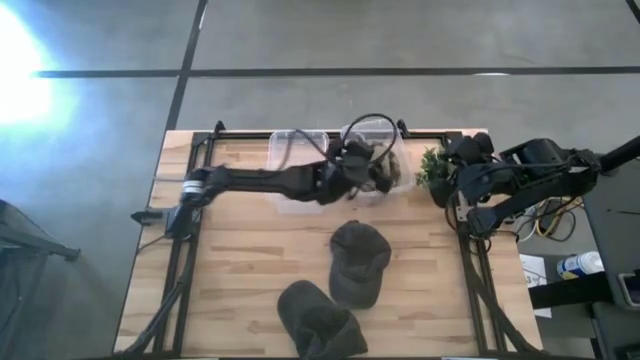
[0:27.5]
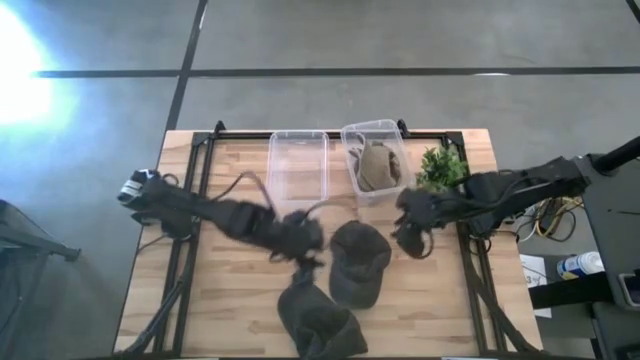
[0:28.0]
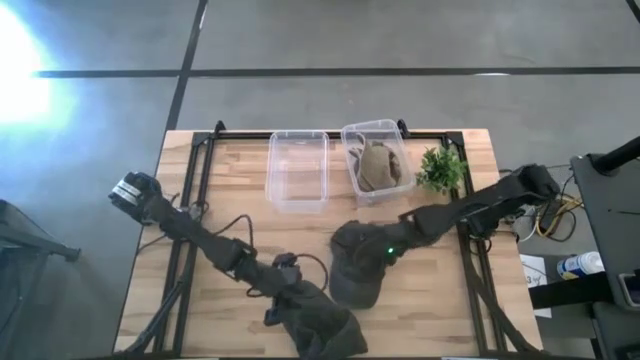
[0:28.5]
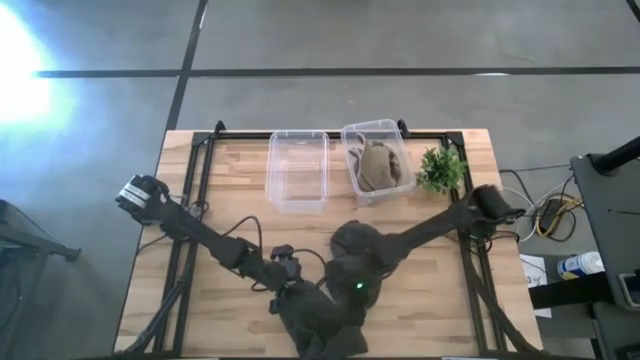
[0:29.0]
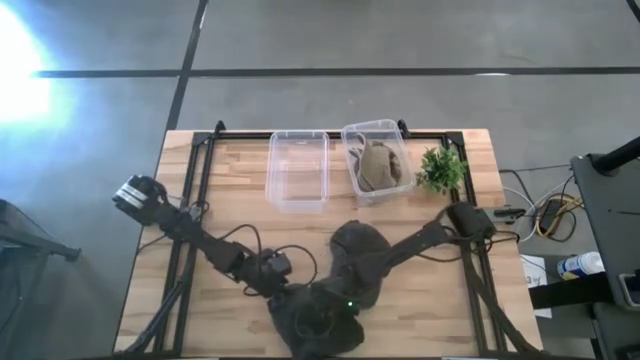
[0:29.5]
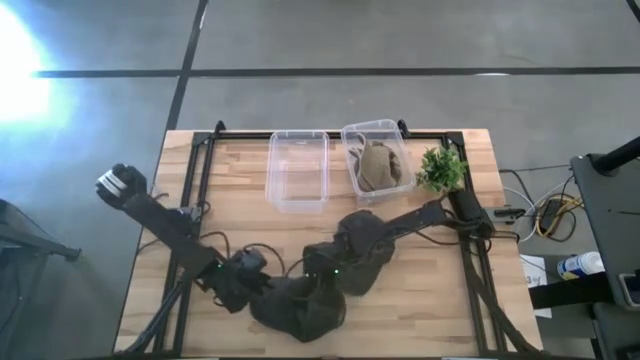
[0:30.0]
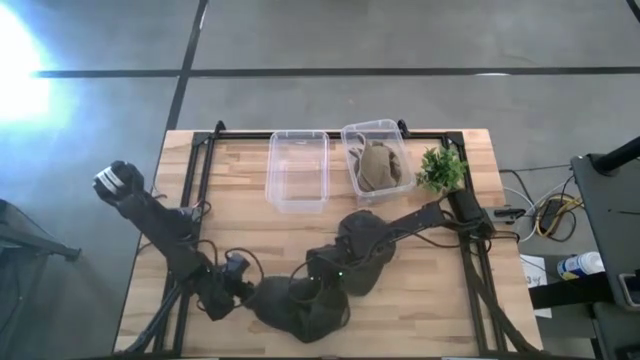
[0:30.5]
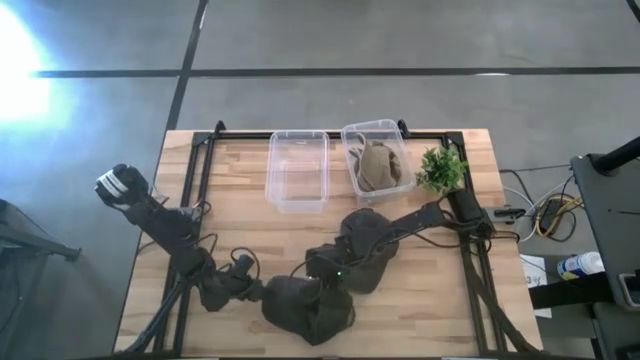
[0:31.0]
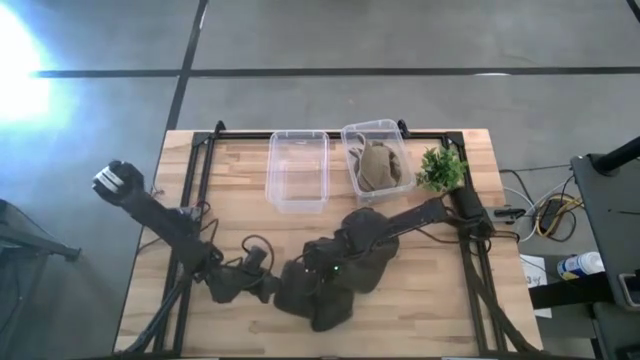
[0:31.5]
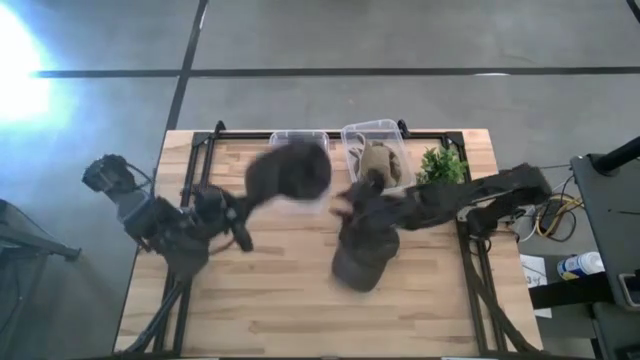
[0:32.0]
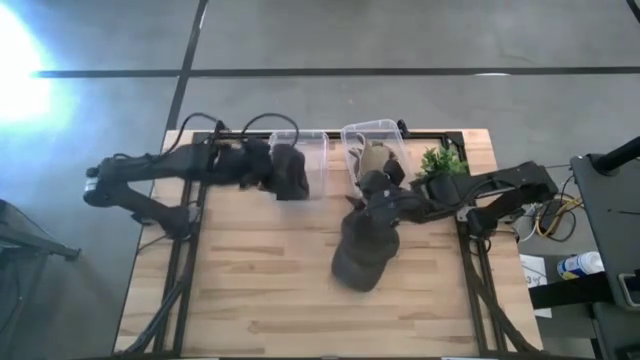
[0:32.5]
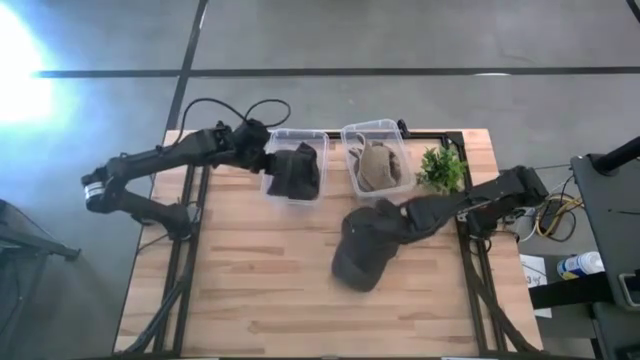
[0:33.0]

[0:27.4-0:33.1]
Task: Pick & Place hat
Put the bottom black cap into the left transparent bin

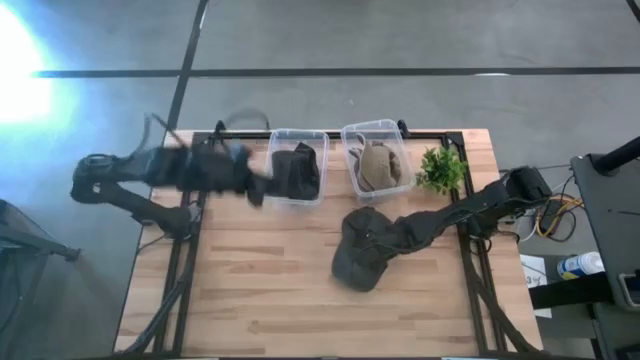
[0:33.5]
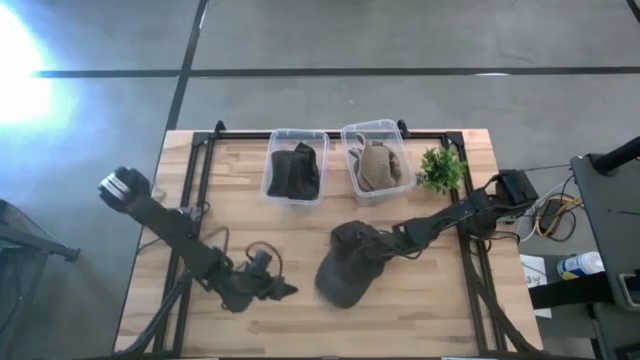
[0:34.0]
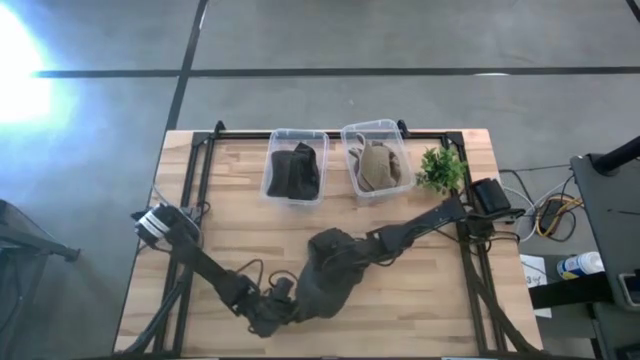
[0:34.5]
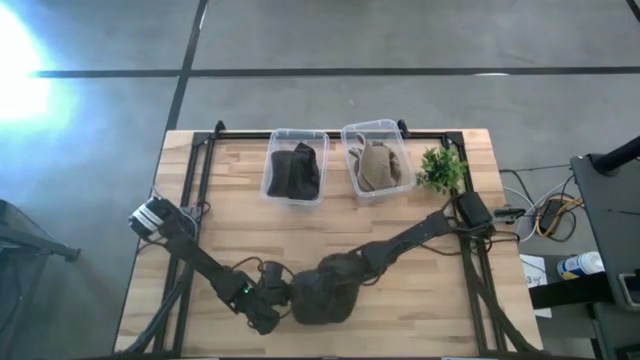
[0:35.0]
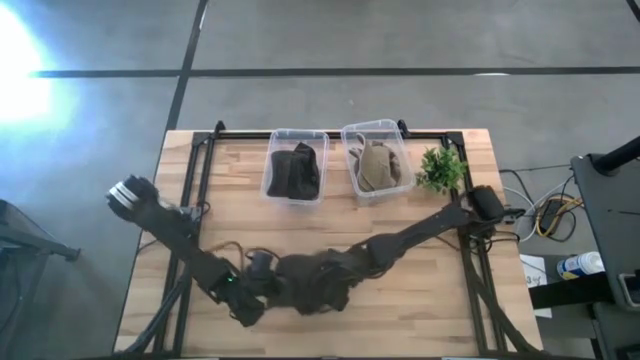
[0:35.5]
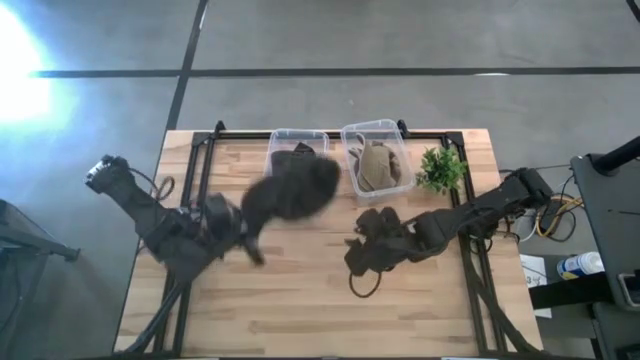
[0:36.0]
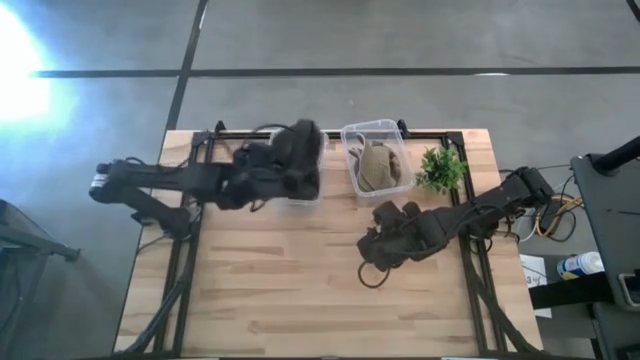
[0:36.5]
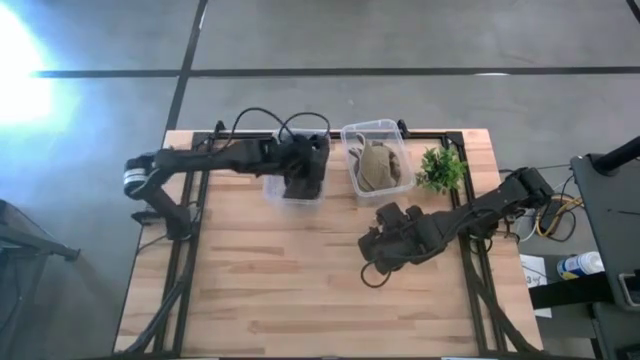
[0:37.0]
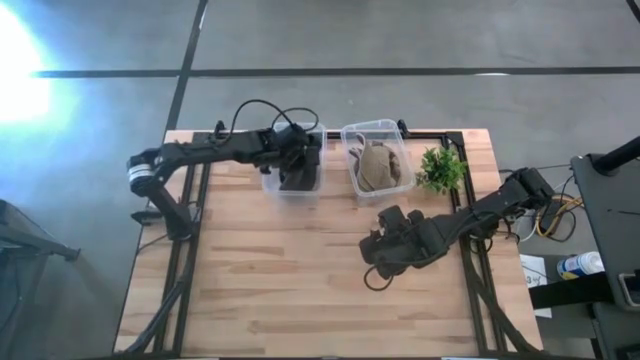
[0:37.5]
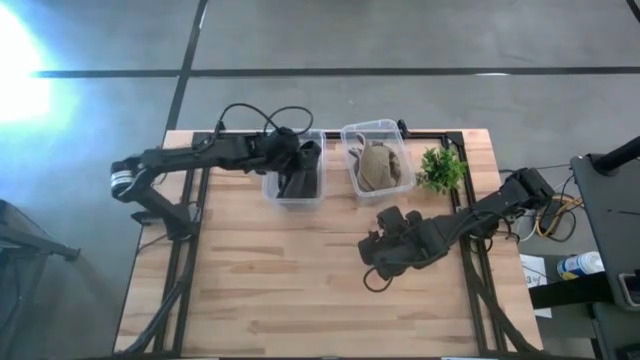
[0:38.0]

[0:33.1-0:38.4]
Put the black cap into the left transparent bin

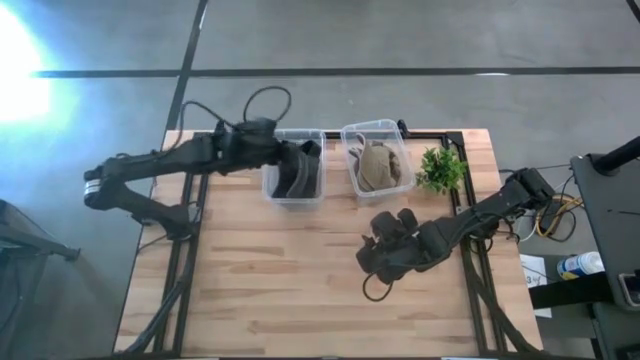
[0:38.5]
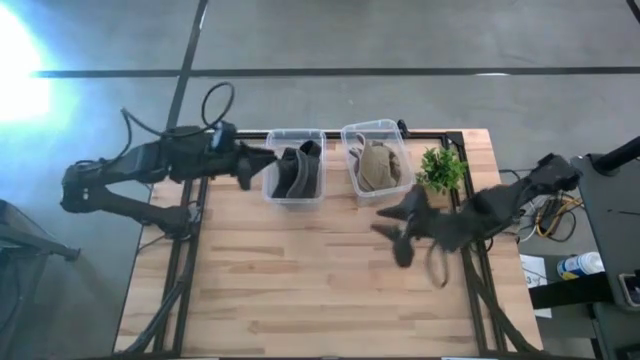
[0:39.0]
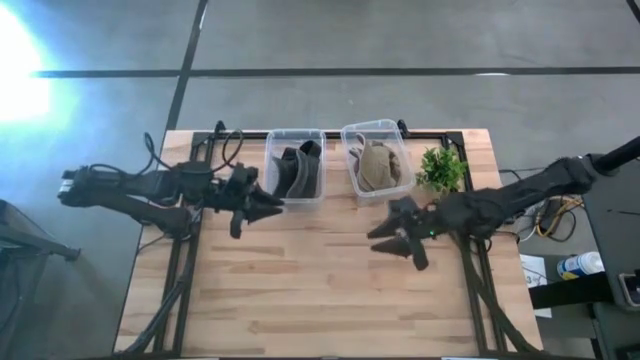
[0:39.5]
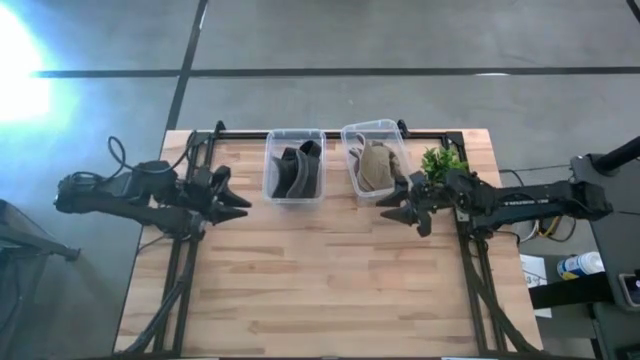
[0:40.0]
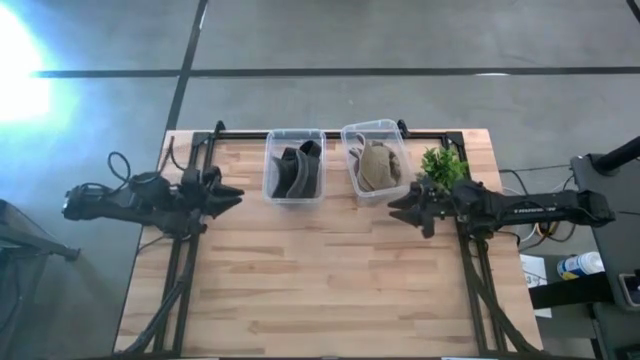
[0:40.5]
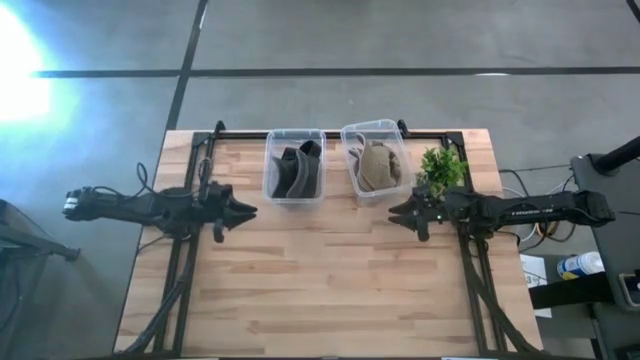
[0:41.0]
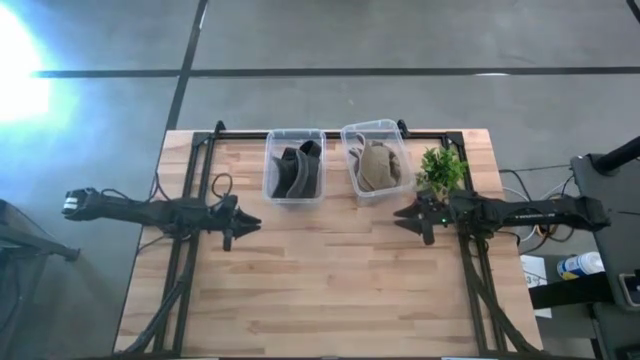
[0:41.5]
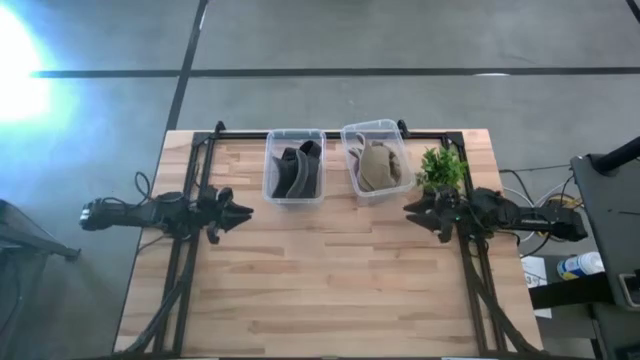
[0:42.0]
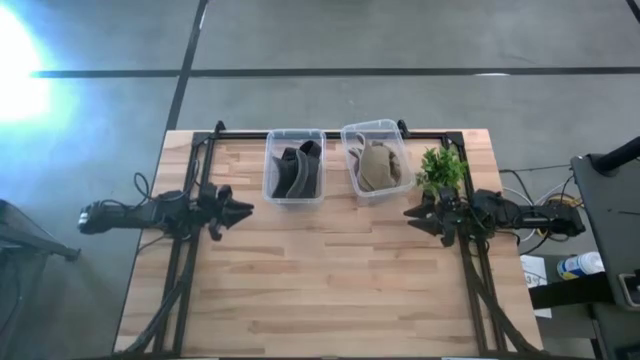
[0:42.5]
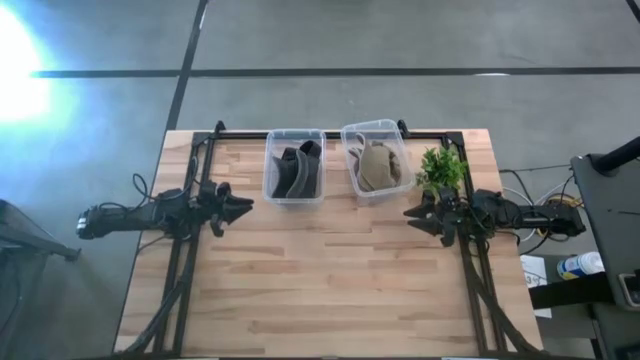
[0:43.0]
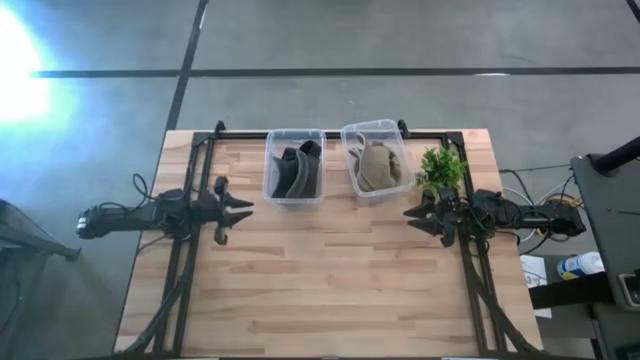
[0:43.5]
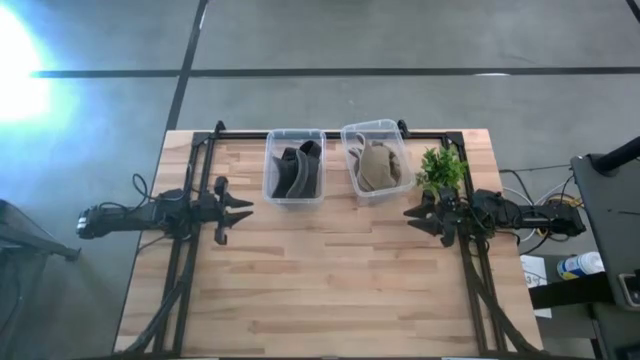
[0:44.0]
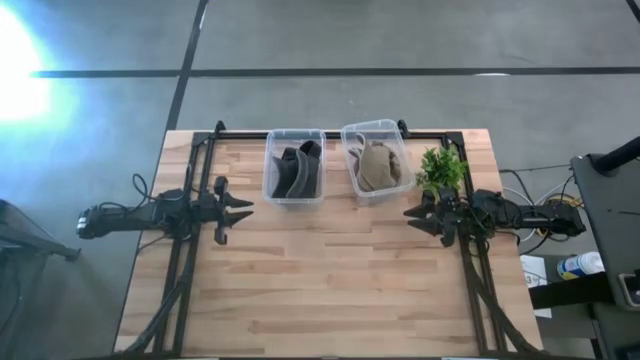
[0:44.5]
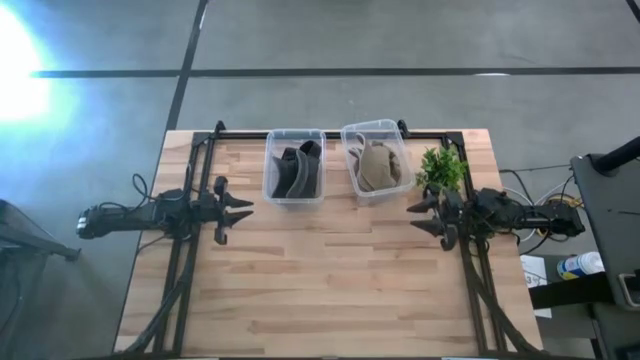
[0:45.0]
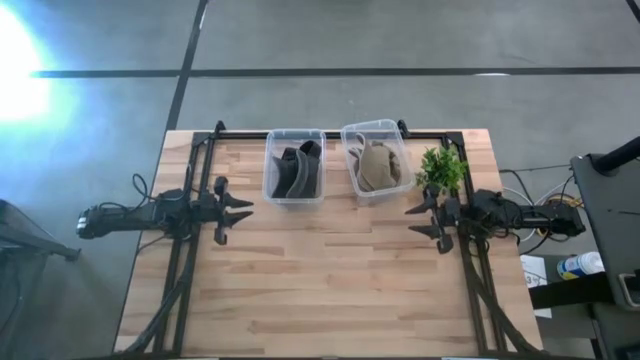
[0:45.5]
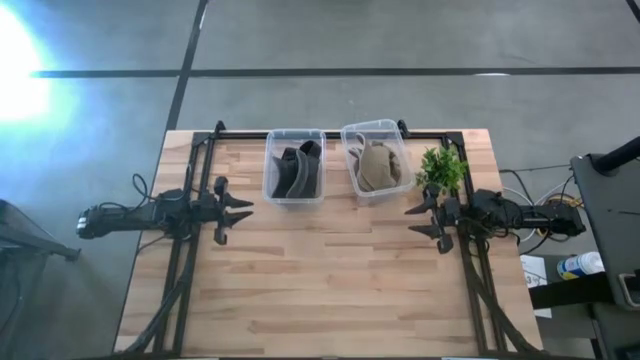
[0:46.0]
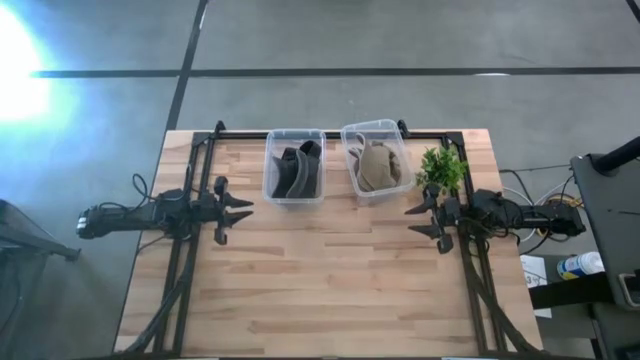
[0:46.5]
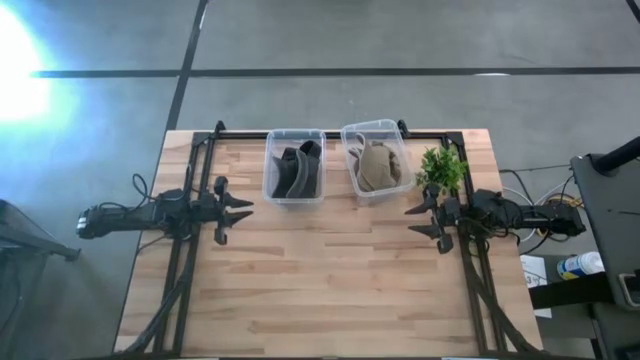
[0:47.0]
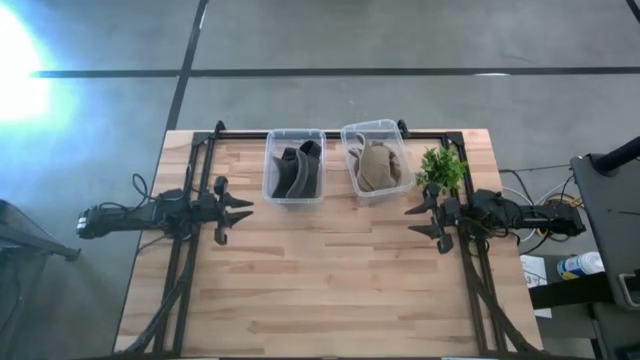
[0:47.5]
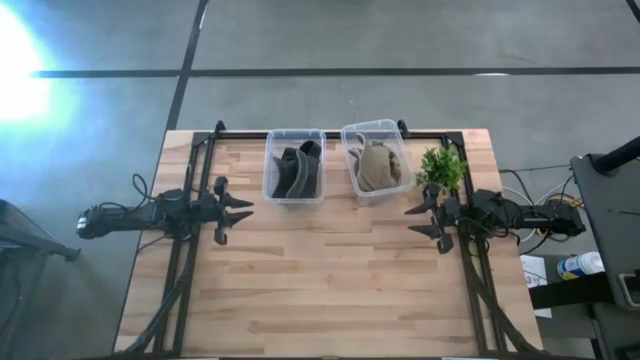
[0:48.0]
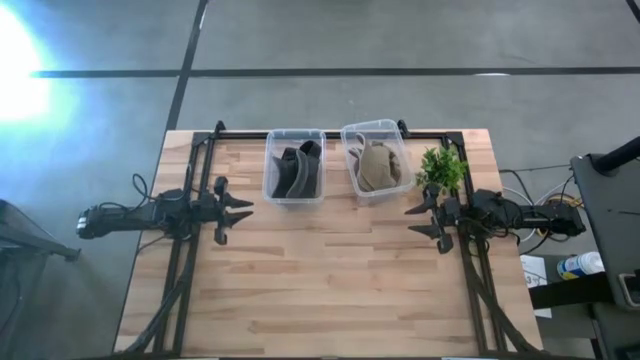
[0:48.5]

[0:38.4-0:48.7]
Return to Home Position
